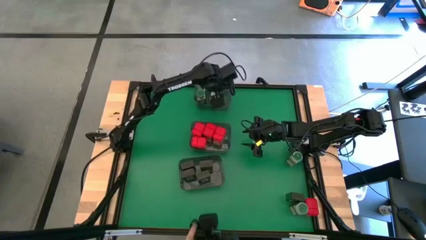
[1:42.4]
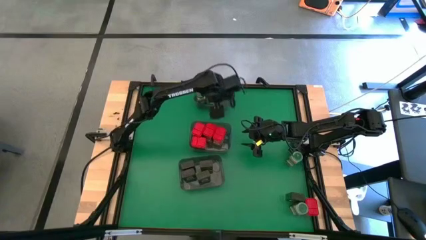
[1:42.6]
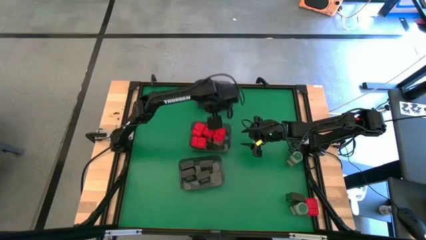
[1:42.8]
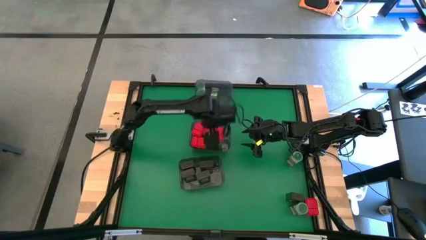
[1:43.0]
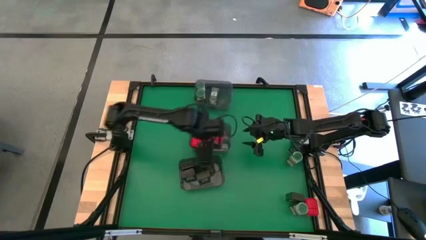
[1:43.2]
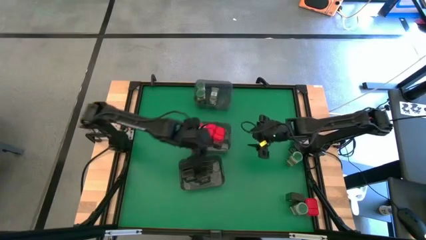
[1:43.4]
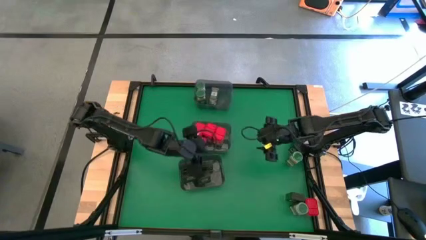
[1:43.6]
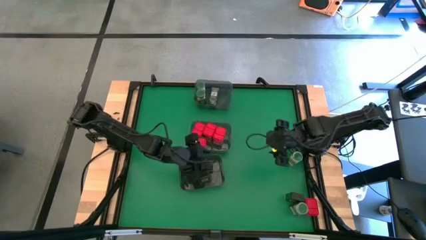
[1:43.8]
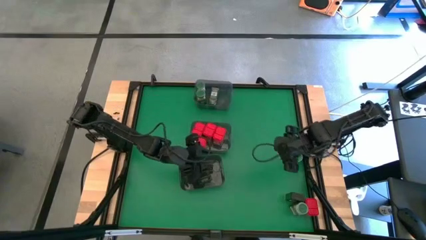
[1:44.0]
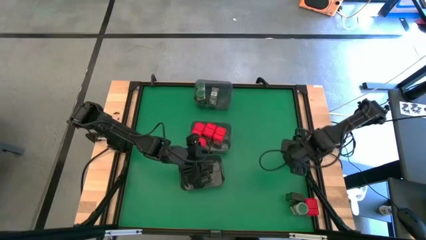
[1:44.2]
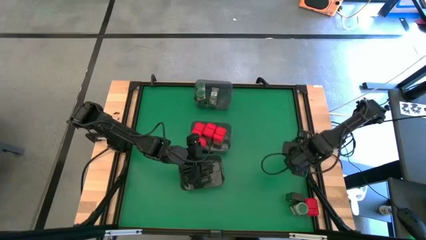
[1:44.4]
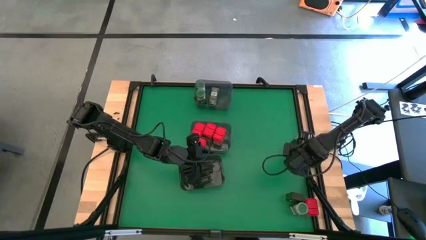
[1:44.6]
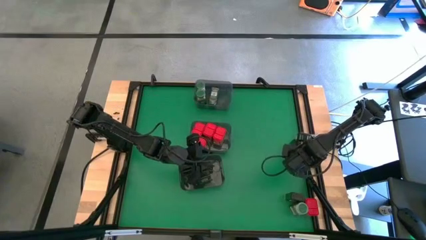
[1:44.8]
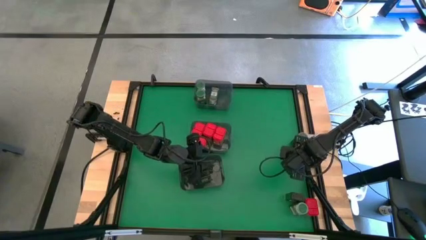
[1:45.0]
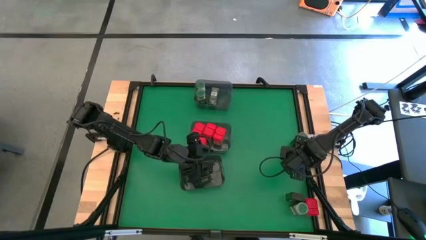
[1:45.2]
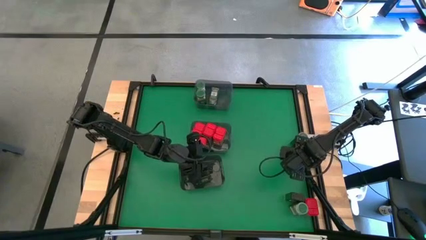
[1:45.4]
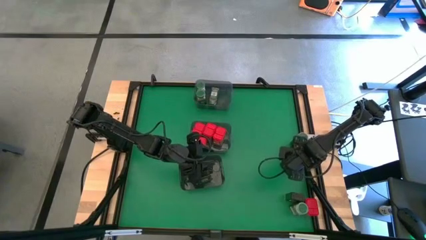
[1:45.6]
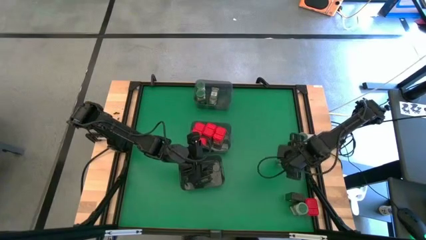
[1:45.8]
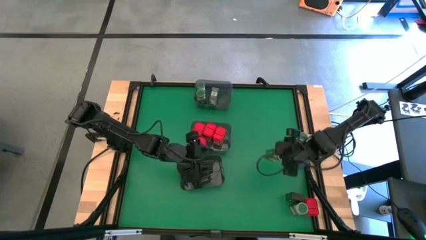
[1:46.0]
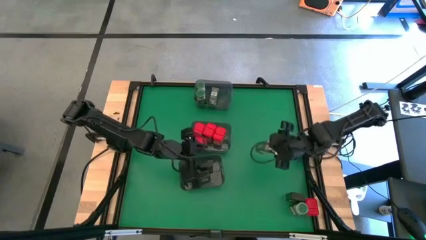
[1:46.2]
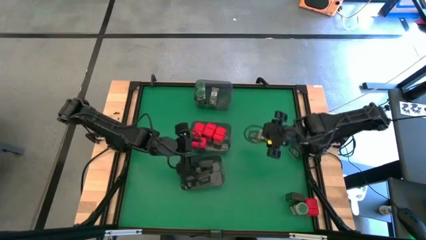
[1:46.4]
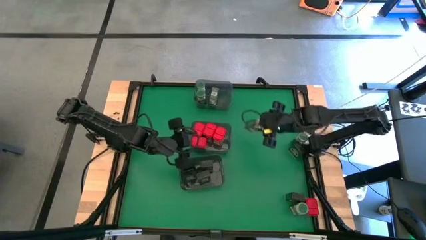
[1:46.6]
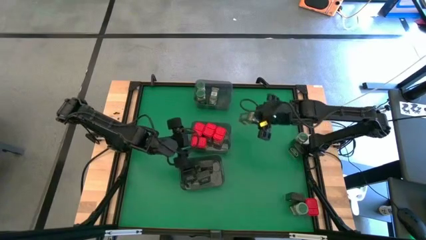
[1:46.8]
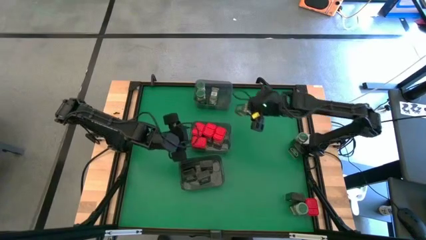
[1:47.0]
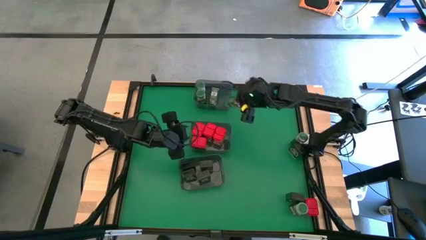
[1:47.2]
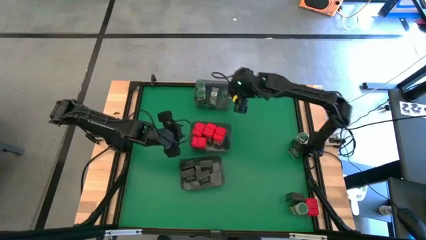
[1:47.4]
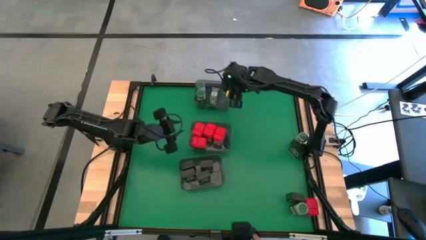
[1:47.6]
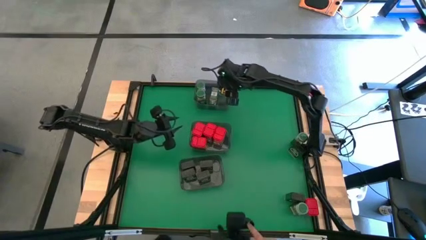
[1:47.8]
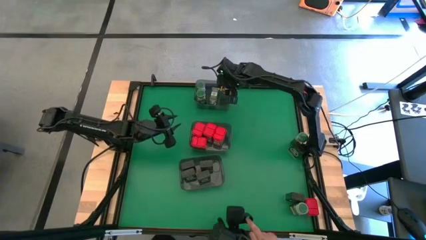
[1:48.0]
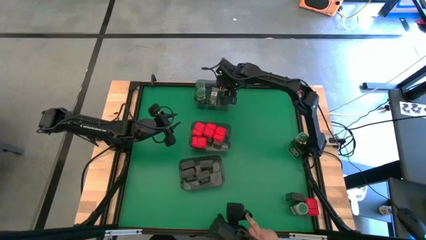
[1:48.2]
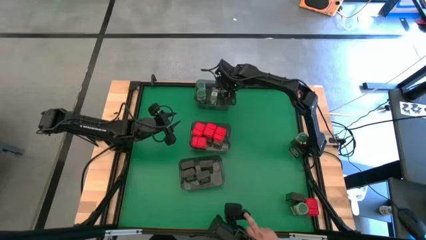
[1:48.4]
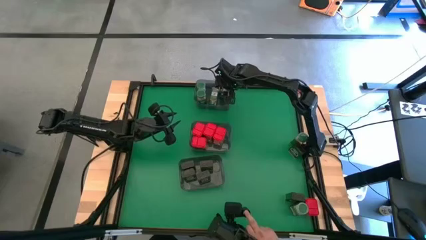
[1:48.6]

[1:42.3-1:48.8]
Task: Sort spices by type
Put the green seasoning bottle into the top gray bin

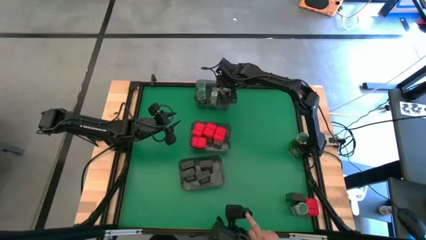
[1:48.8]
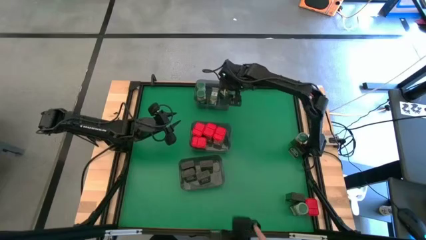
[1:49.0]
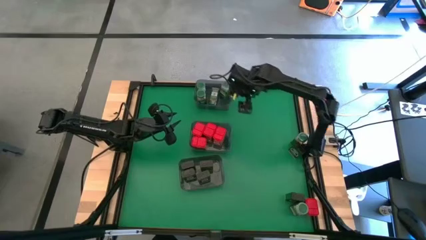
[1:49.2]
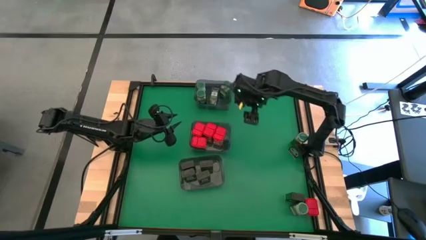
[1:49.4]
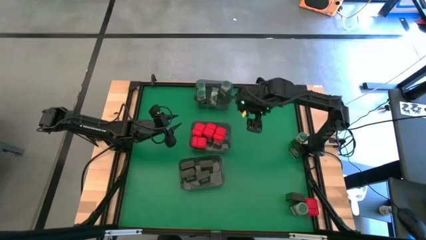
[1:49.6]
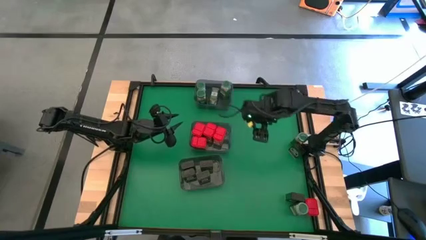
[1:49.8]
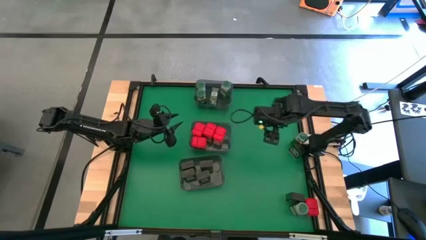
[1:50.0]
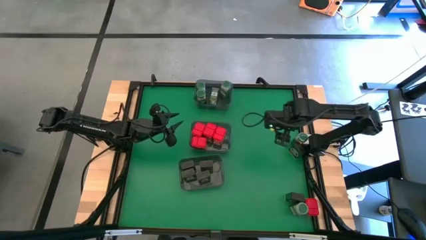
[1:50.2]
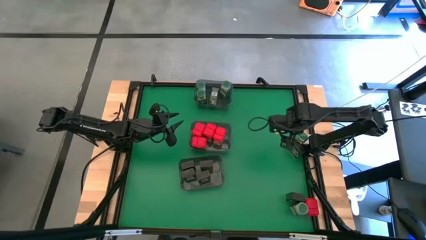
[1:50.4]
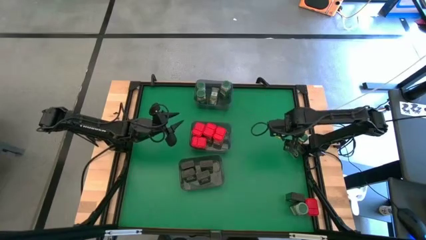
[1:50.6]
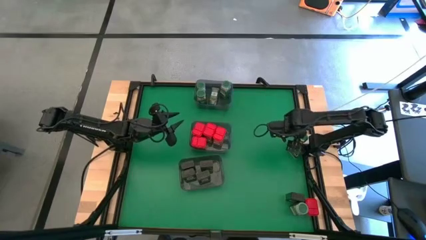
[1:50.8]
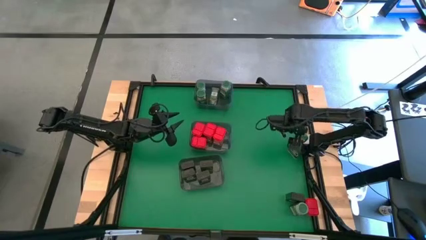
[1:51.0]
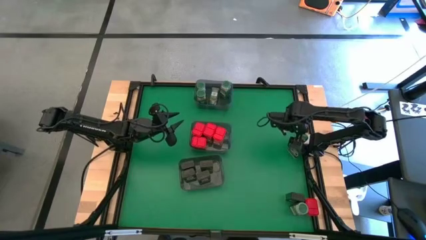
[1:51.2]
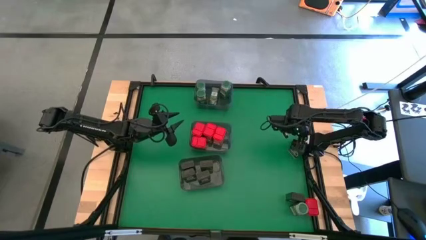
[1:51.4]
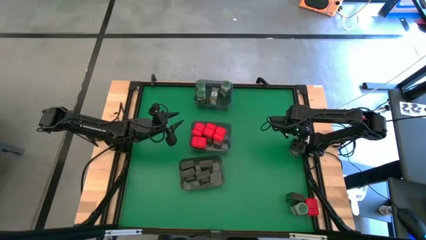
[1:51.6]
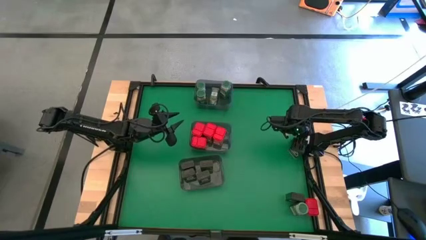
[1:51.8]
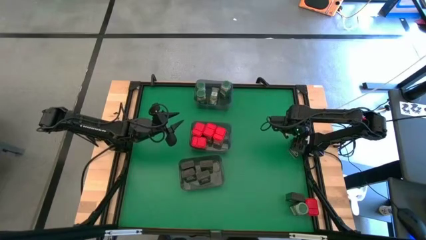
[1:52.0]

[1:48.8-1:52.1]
Put the green seasoning bottle into the top gray bin

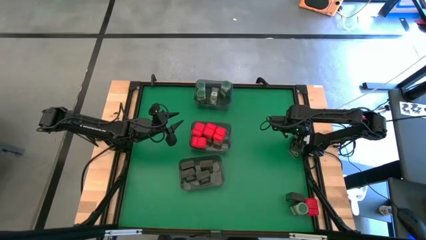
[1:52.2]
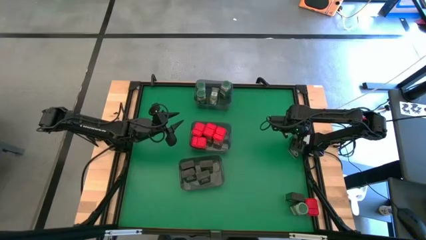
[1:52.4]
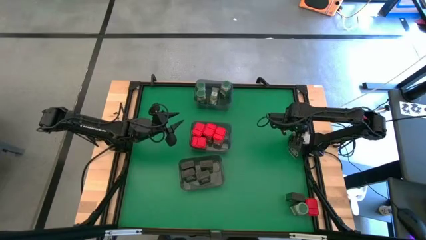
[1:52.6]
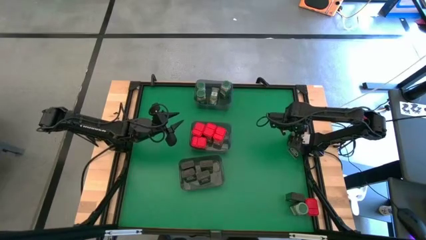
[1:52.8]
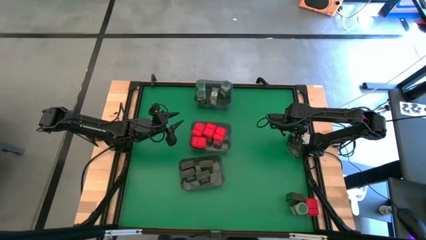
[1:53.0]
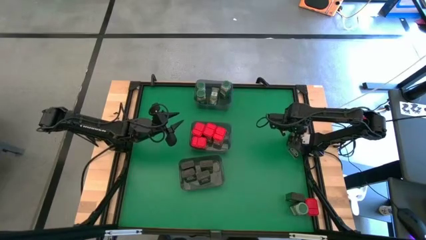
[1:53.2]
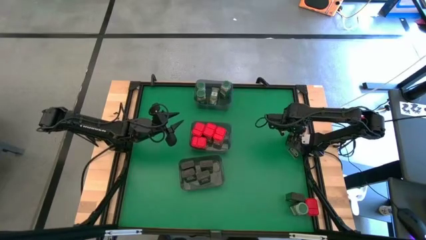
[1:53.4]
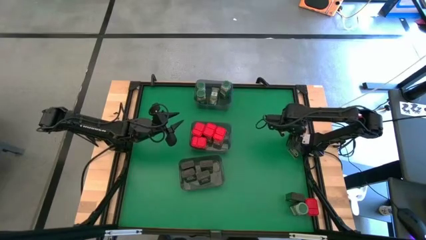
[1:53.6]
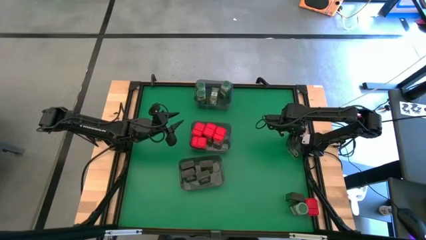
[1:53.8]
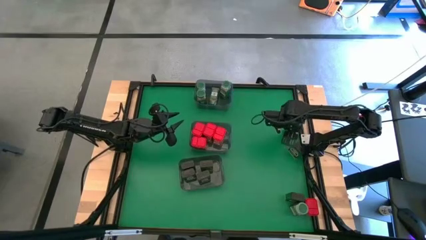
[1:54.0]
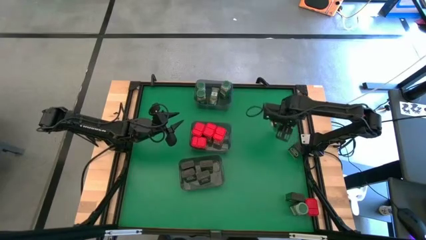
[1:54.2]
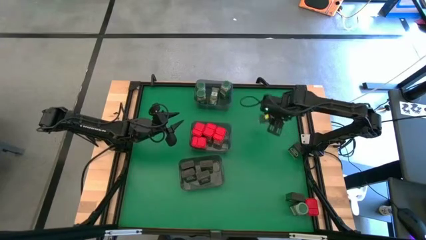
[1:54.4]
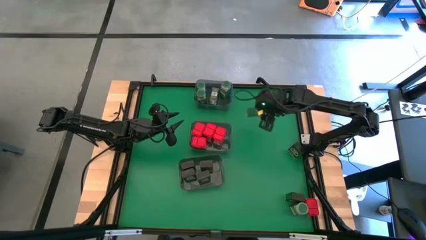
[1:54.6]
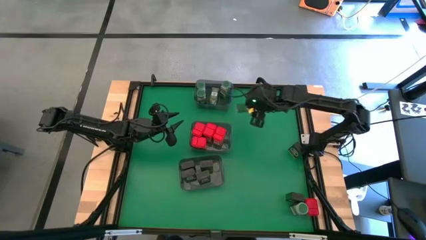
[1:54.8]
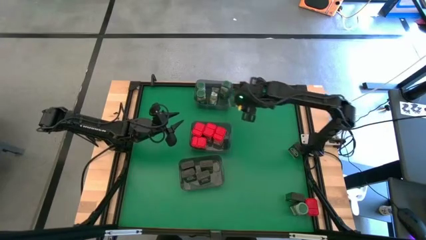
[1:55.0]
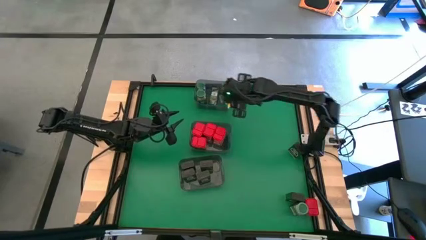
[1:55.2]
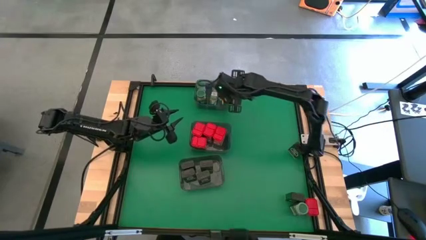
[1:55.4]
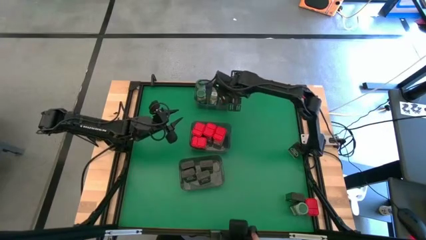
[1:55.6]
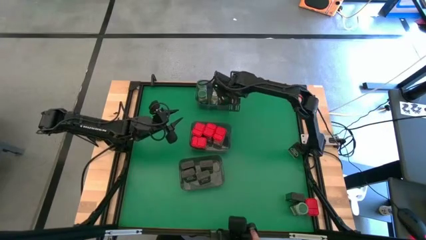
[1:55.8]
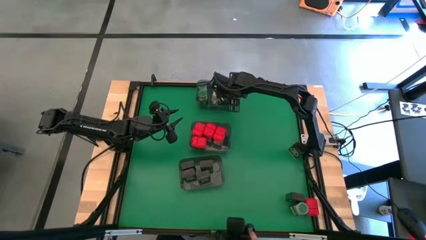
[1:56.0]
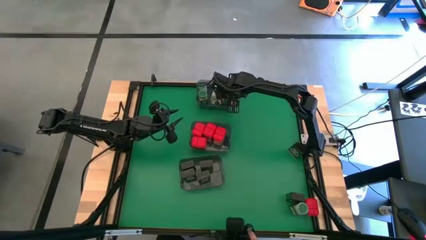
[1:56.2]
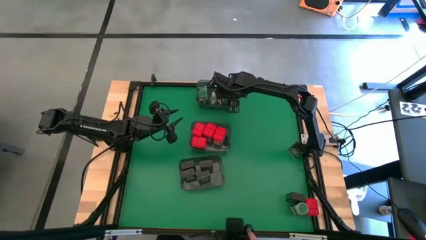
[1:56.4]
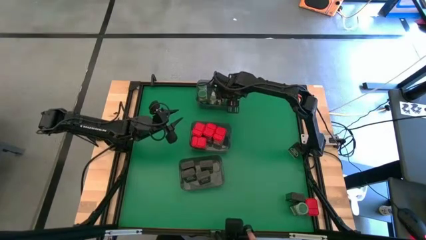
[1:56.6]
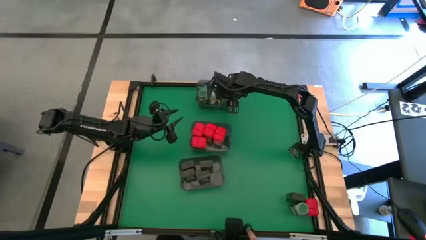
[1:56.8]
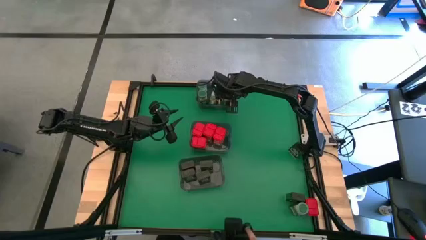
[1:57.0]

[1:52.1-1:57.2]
Put the green seasoning bottle into the top gray bin

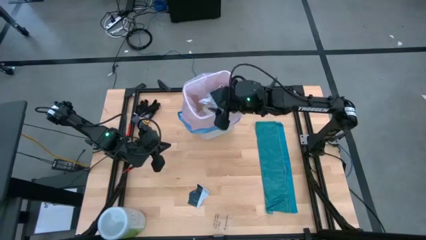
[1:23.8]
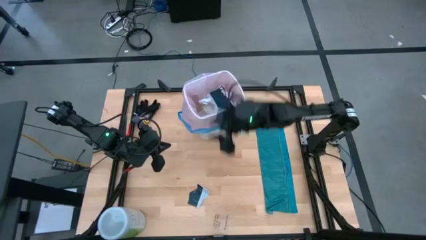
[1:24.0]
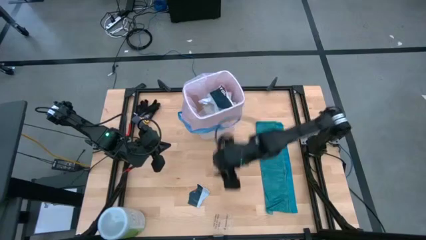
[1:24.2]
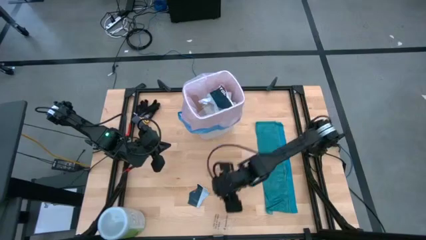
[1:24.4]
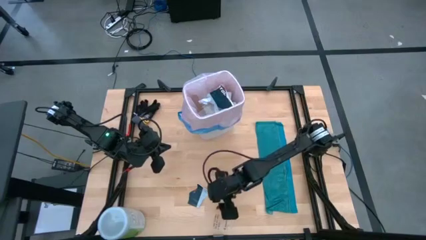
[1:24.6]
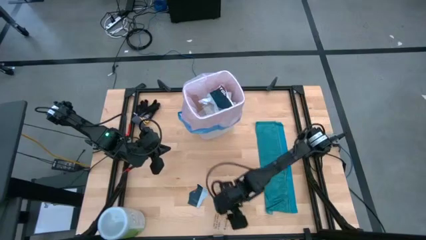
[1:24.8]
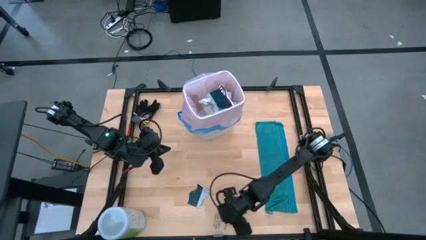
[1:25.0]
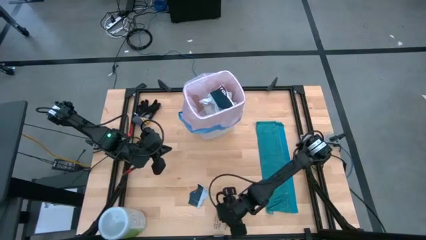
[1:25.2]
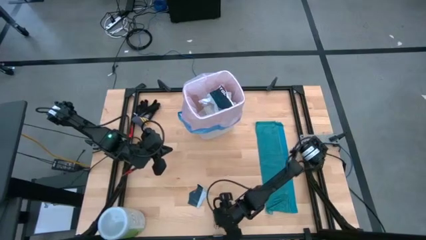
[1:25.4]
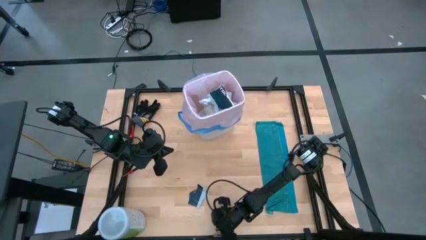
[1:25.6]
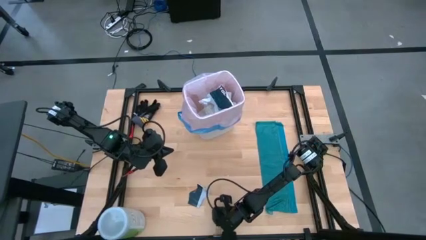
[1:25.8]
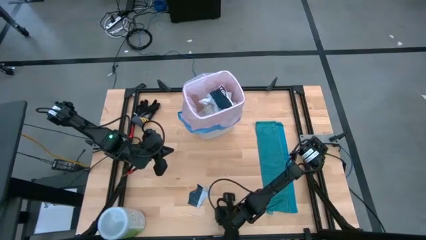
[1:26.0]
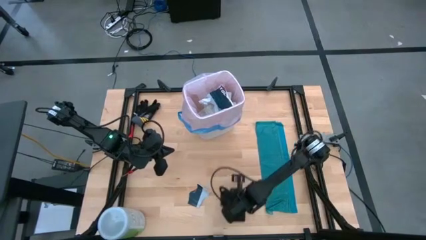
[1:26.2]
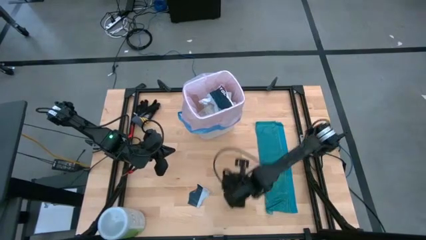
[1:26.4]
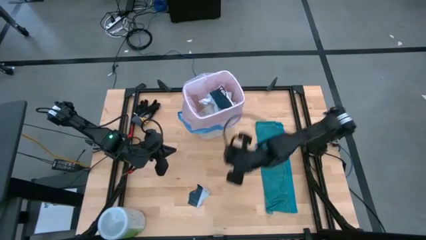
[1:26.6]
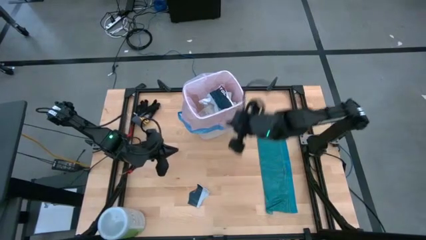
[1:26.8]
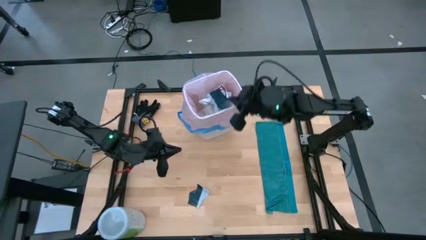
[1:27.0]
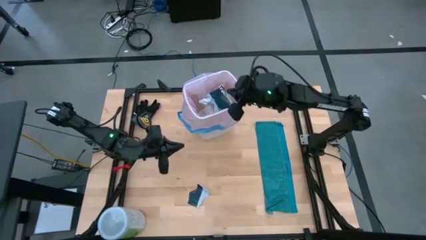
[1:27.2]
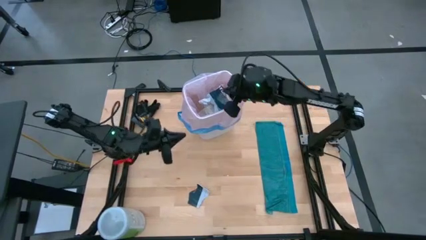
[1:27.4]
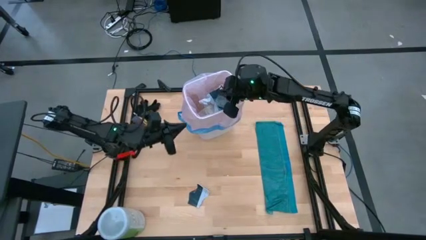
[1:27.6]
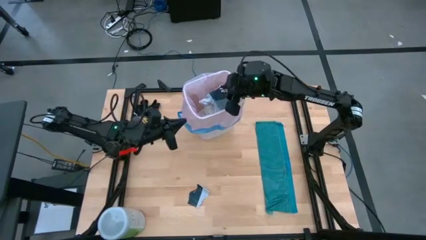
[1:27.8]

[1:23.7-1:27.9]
Task: place trash/remove bag and relplace
Put the transparent plastic into the white trash bin
